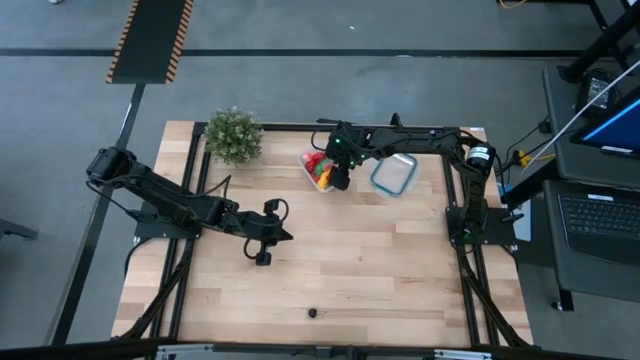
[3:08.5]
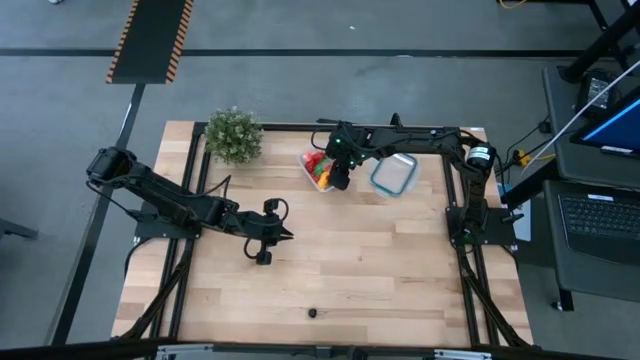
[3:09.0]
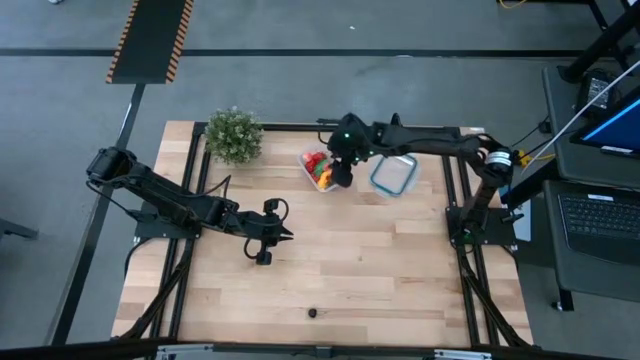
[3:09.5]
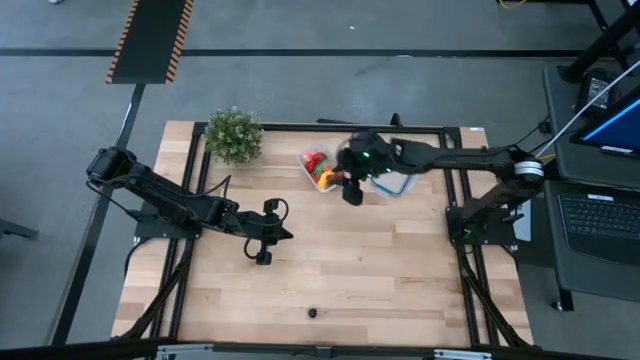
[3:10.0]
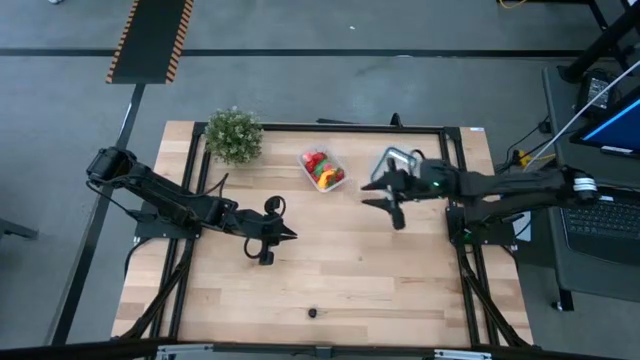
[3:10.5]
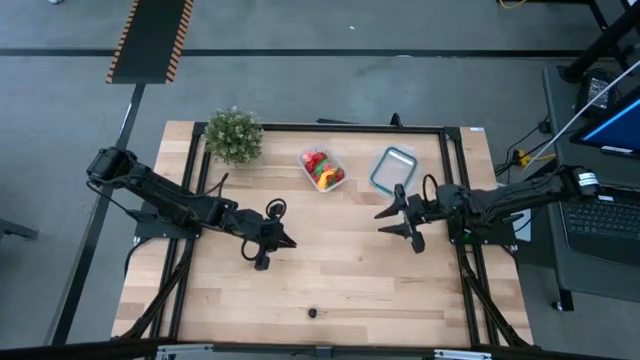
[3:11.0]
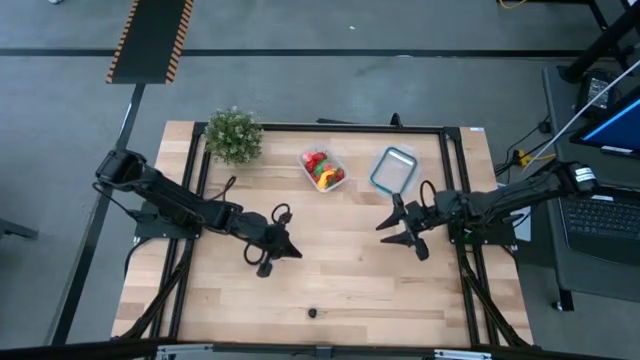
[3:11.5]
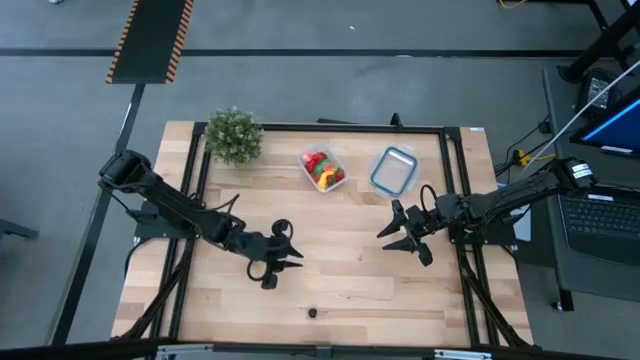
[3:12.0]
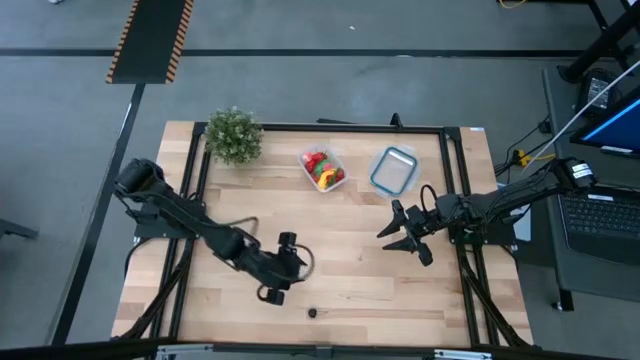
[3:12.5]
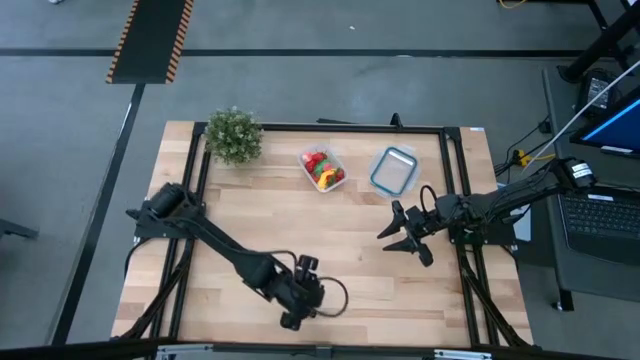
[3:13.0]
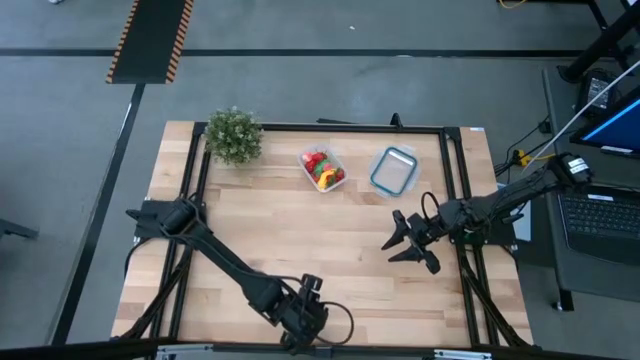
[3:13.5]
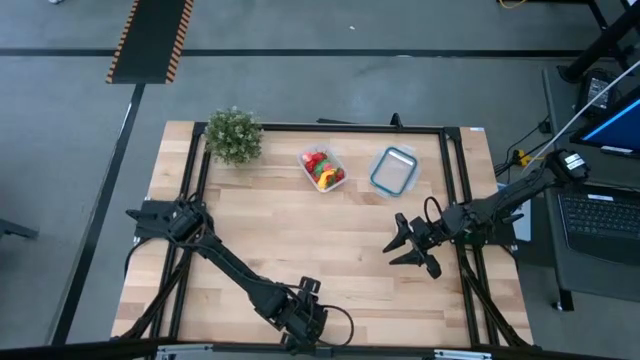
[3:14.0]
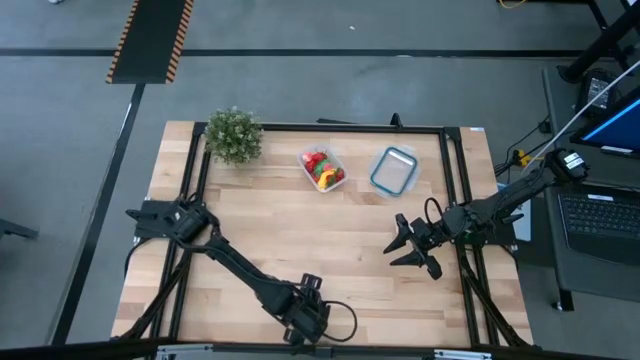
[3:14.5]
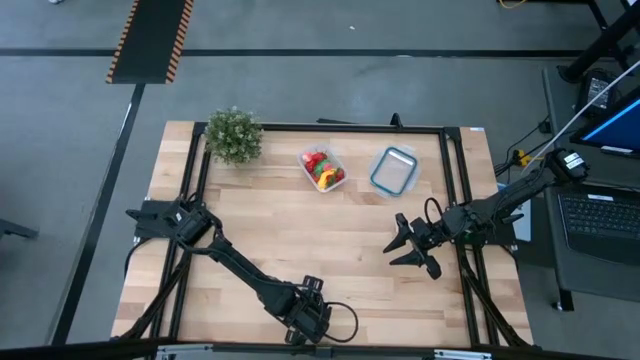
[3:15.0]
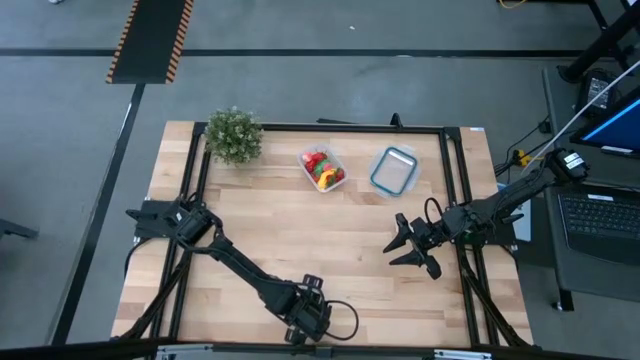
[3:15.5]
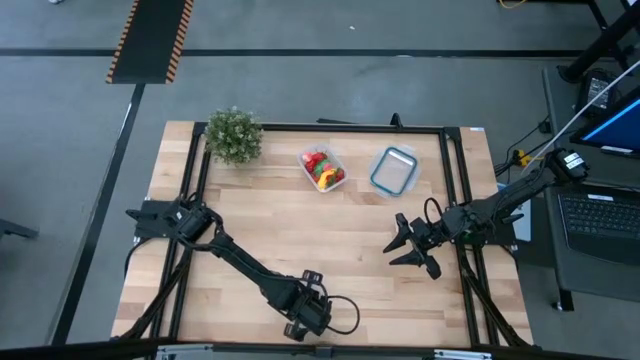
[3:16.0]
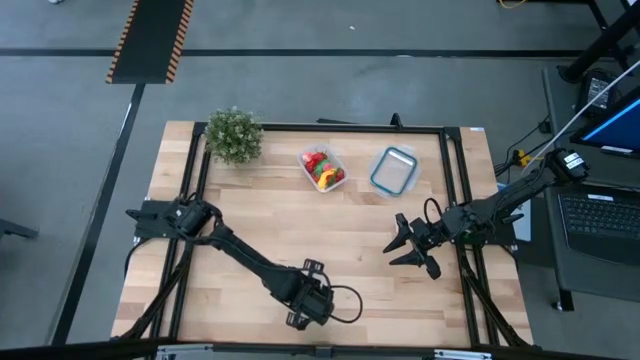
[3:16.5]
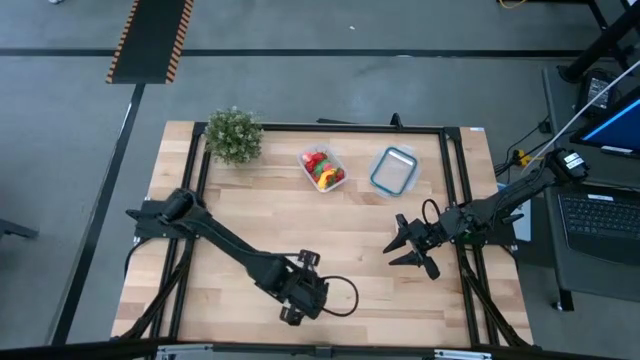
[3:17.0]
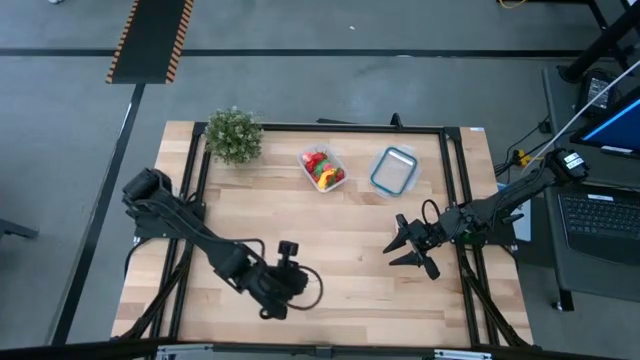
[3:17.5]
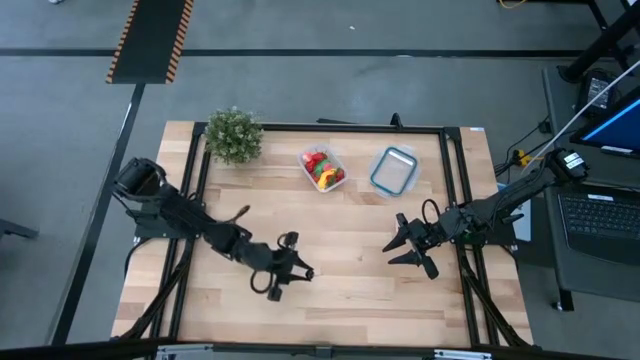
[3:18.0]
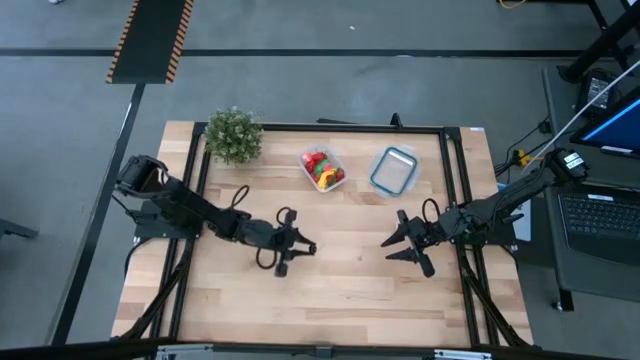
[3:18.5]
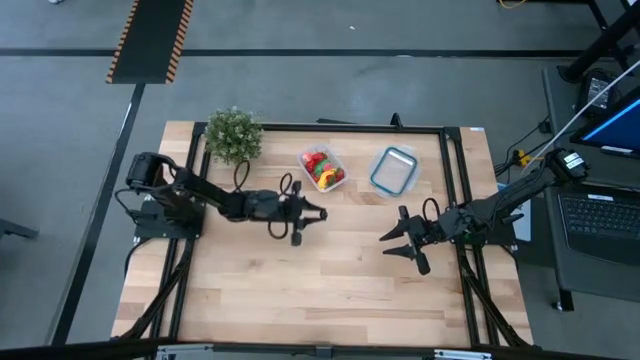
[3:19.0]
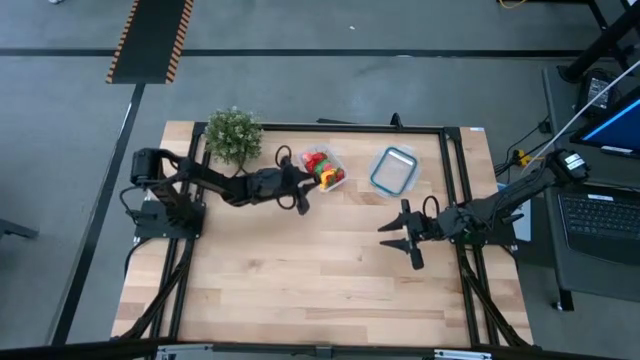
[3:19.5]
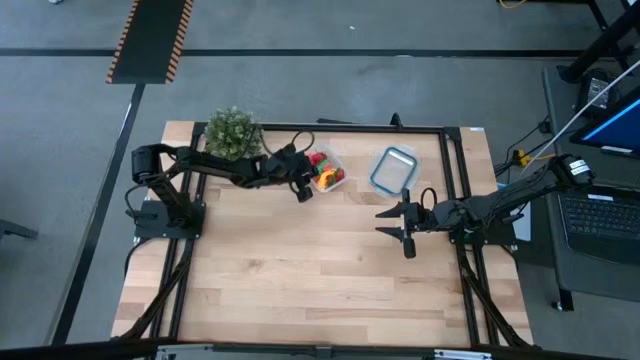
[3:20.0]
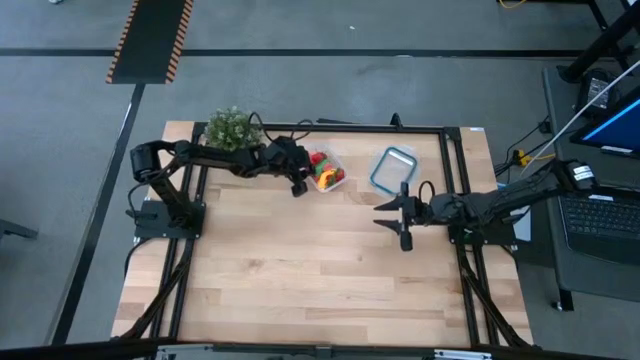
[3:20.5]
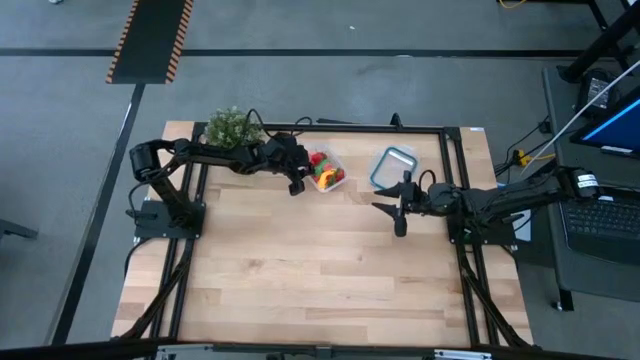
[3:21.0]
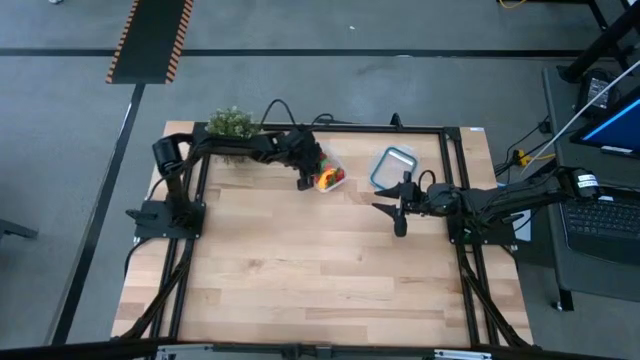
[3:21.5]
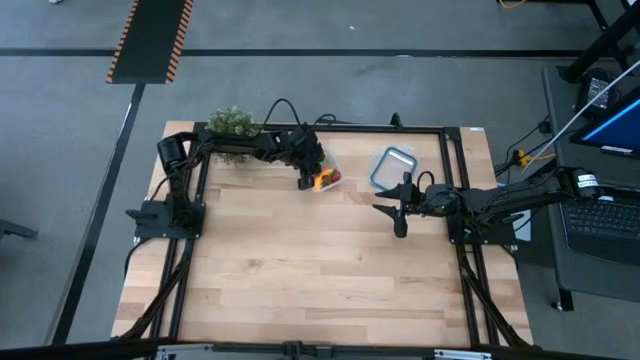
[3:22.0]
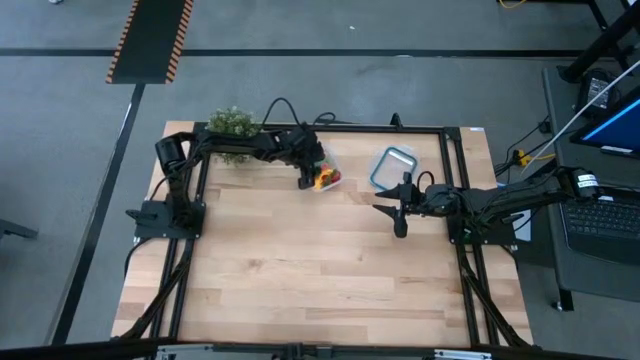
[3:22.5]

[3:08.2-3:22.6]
Task: Pick and placing Produce into tupperware
Put the black cherry into the transparent container

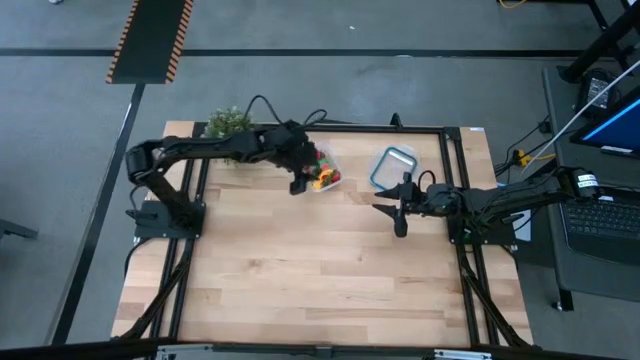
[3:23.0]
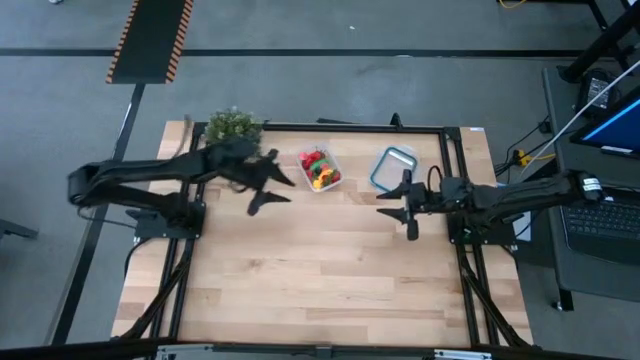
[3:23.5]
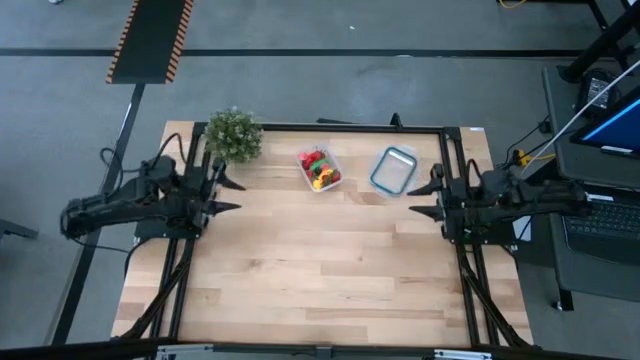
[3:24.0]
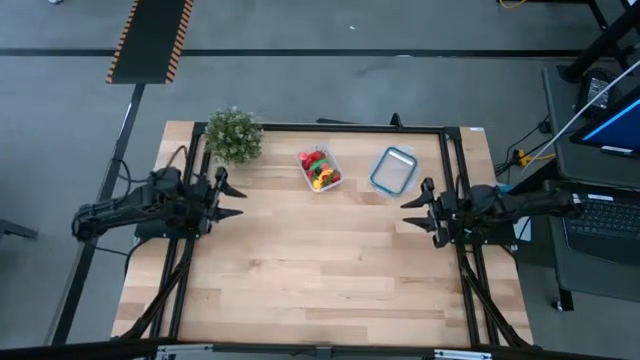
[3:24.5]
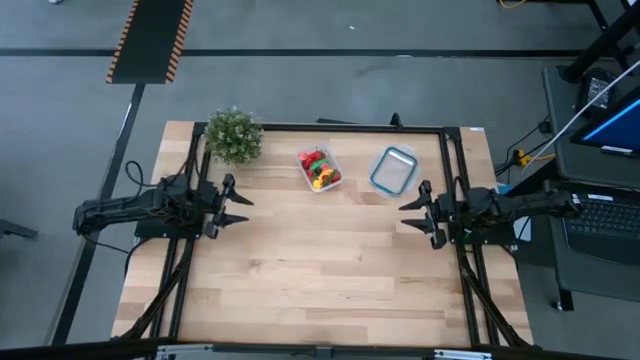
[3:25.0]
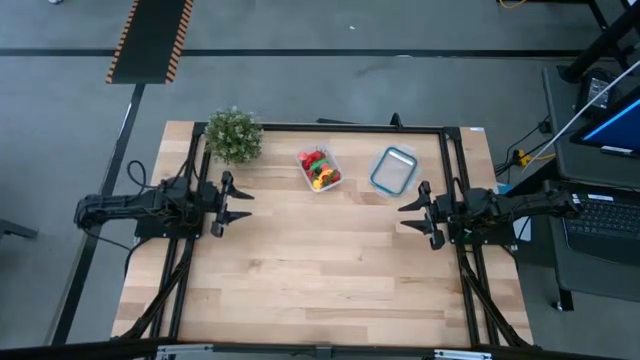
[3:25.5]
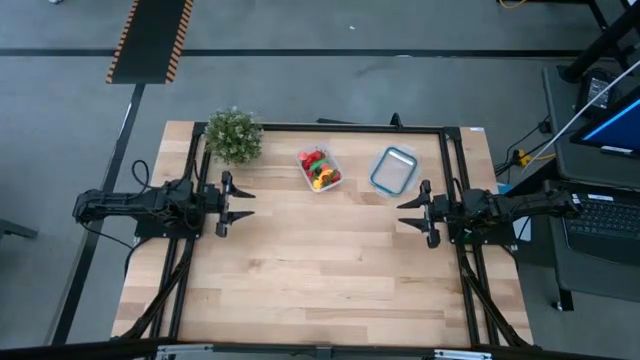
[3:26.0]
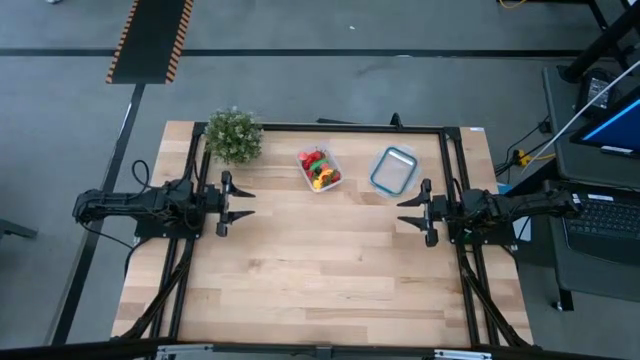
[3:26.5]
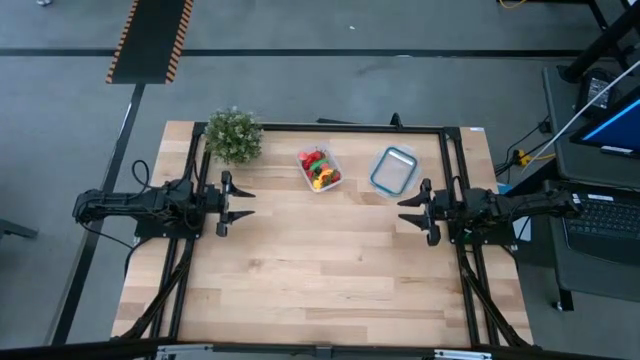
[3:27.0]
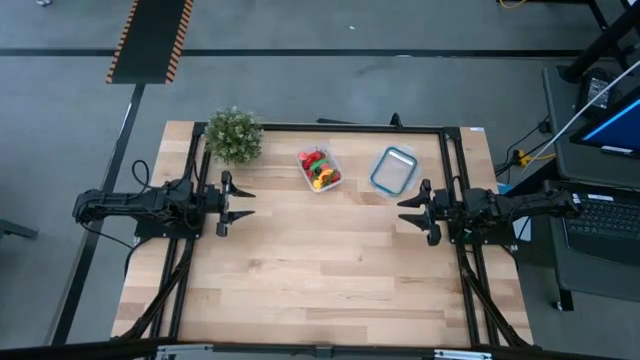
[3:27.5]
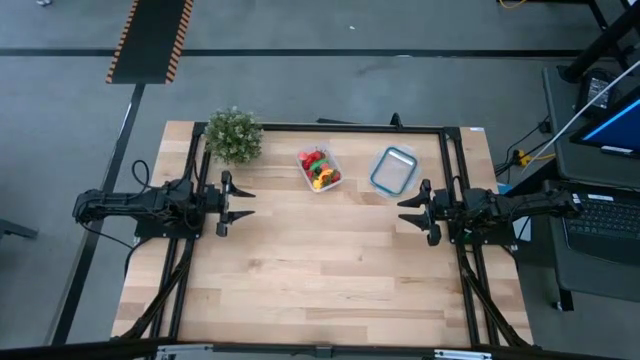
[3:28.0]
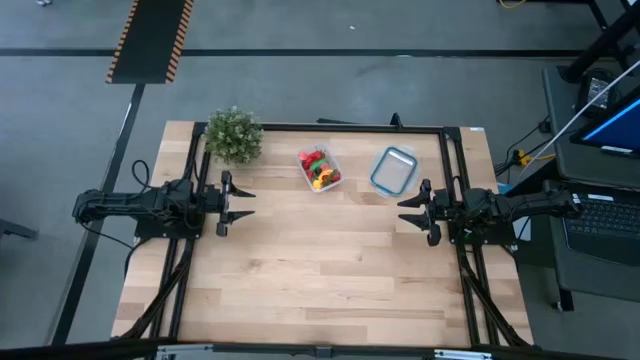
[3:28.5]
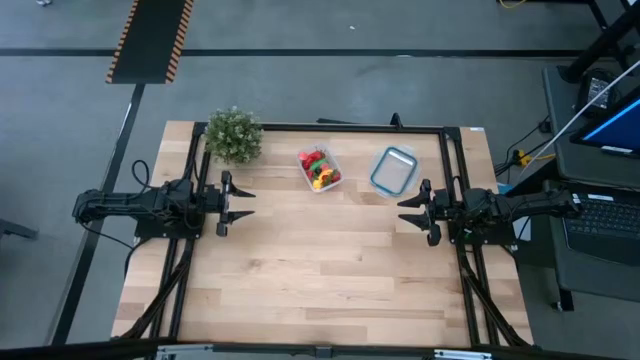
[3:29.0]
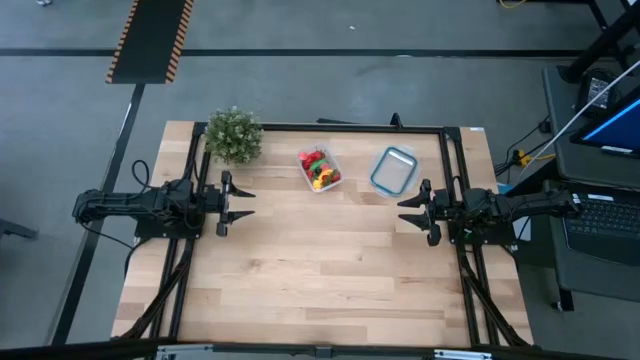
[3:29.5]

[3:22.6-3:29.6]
Return to Home Position
